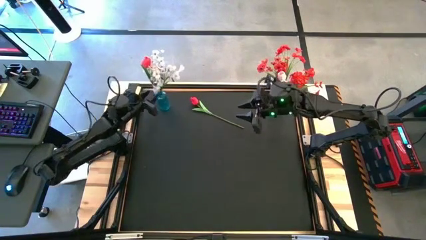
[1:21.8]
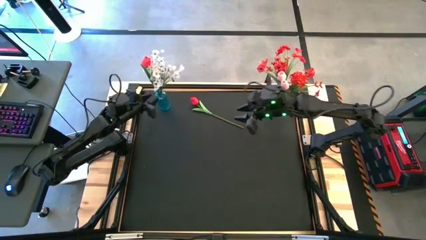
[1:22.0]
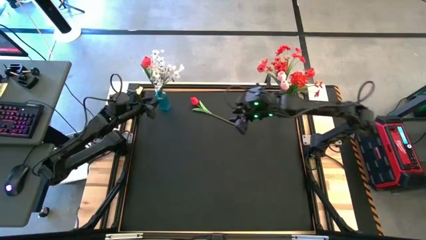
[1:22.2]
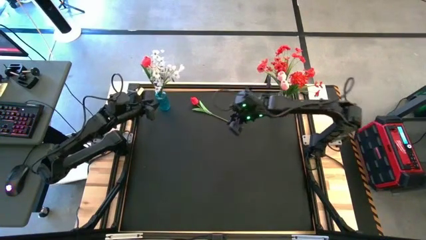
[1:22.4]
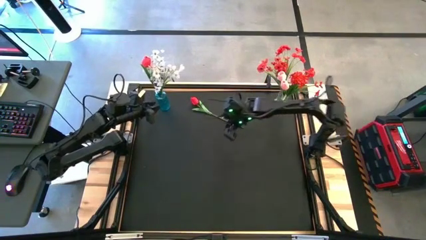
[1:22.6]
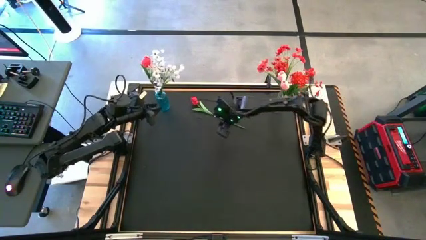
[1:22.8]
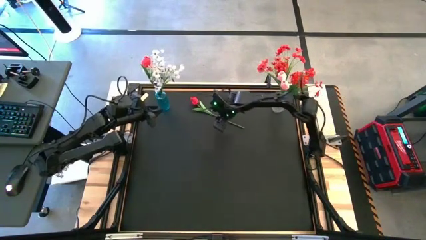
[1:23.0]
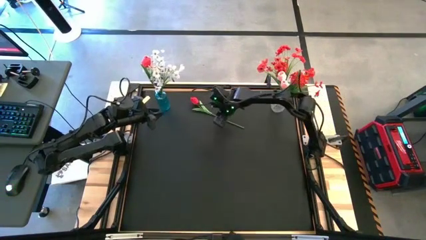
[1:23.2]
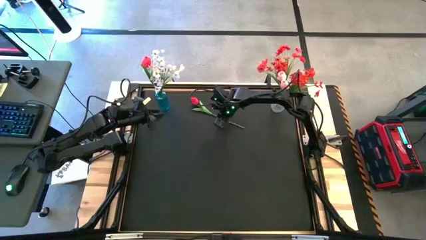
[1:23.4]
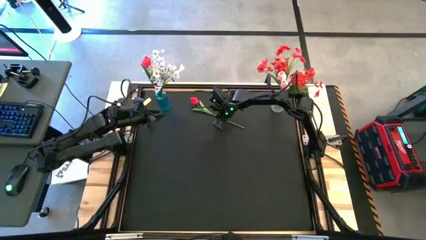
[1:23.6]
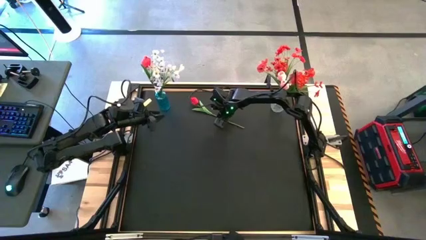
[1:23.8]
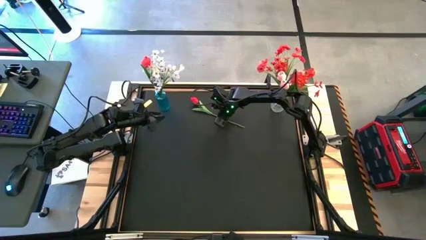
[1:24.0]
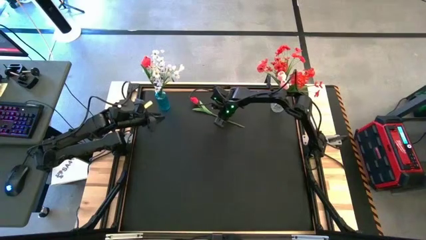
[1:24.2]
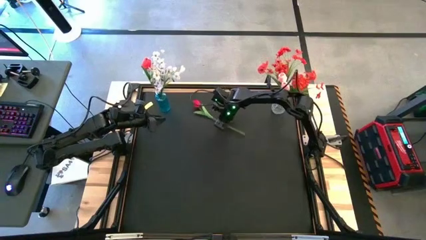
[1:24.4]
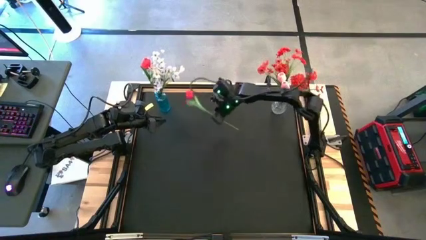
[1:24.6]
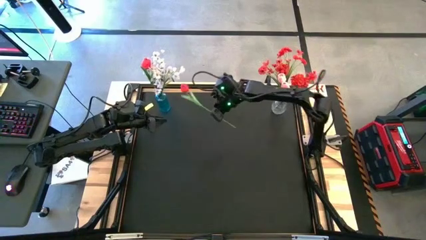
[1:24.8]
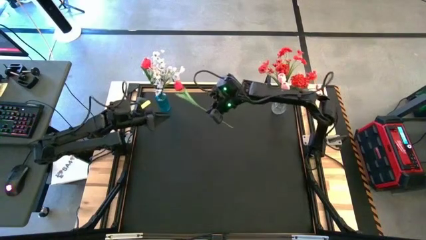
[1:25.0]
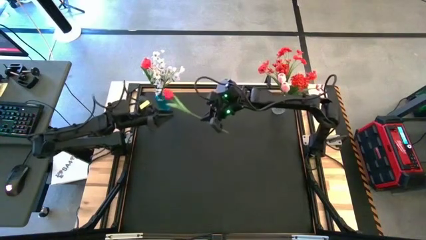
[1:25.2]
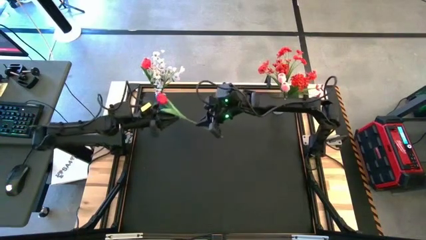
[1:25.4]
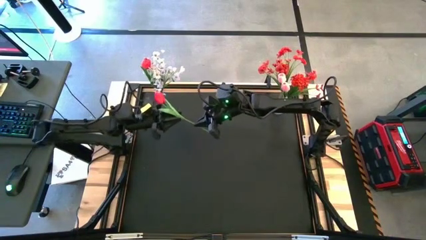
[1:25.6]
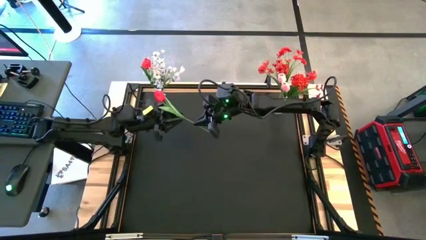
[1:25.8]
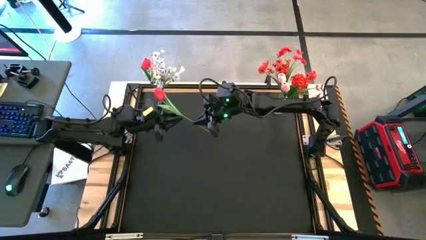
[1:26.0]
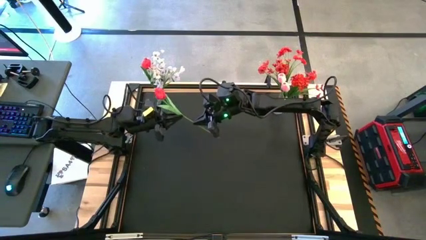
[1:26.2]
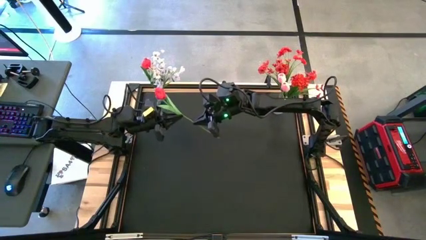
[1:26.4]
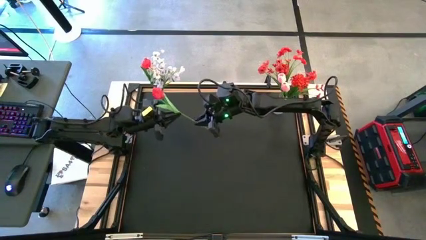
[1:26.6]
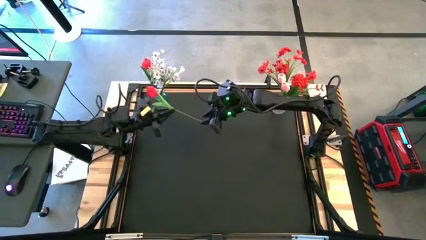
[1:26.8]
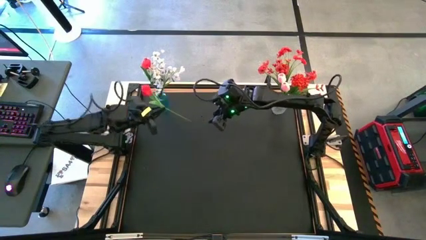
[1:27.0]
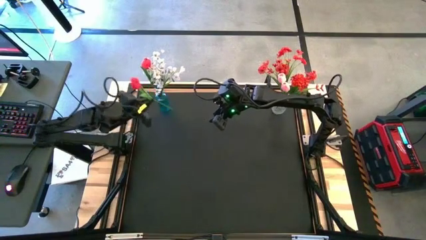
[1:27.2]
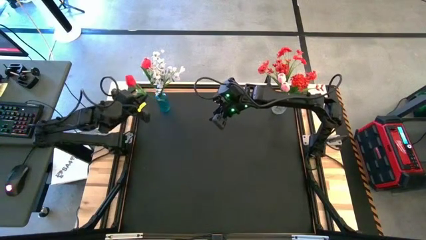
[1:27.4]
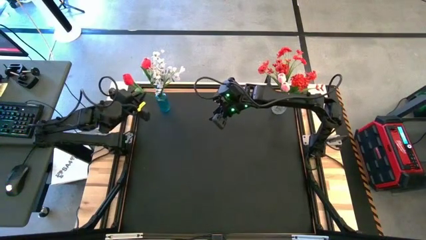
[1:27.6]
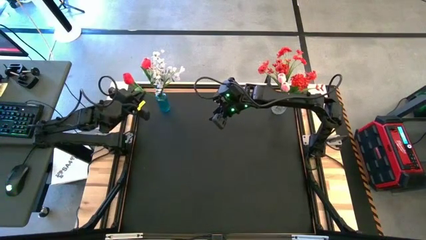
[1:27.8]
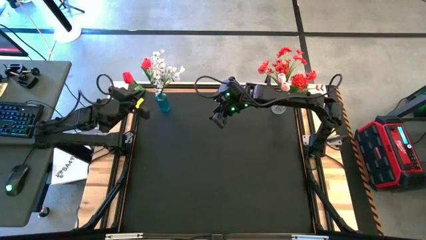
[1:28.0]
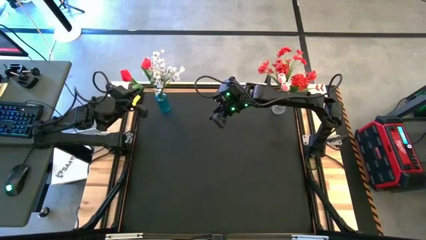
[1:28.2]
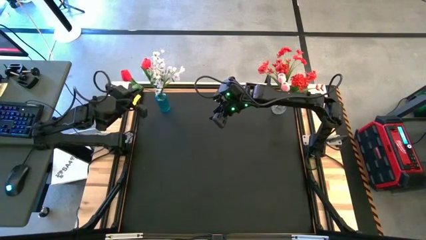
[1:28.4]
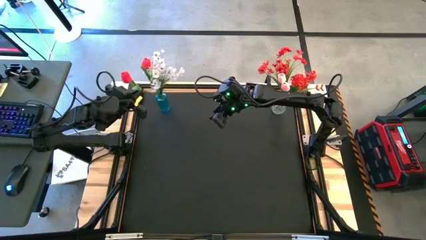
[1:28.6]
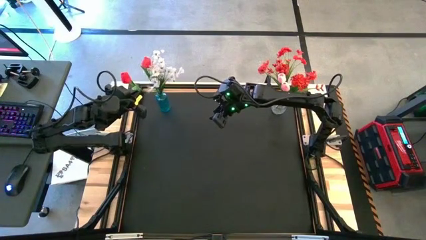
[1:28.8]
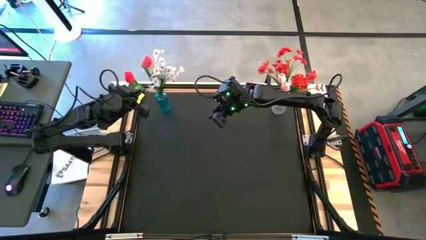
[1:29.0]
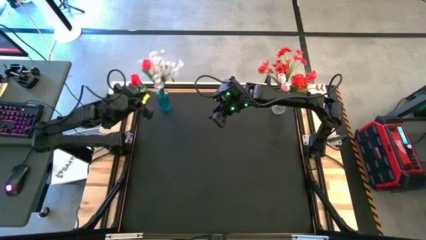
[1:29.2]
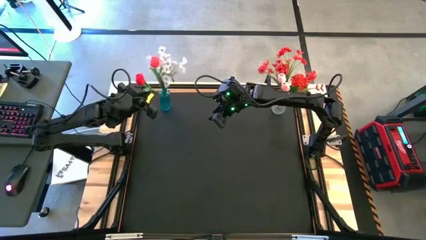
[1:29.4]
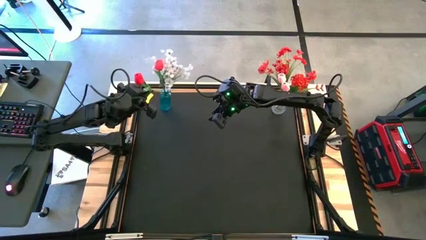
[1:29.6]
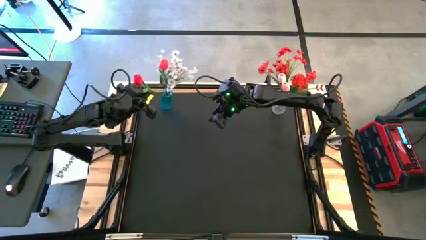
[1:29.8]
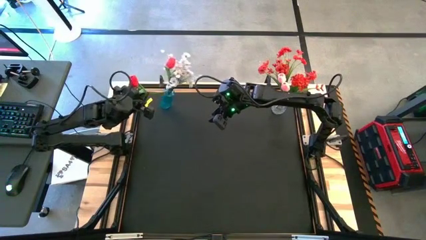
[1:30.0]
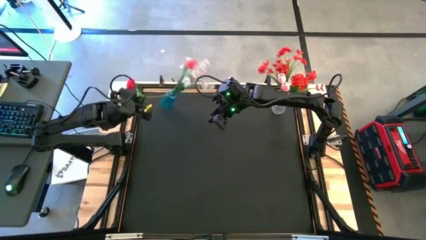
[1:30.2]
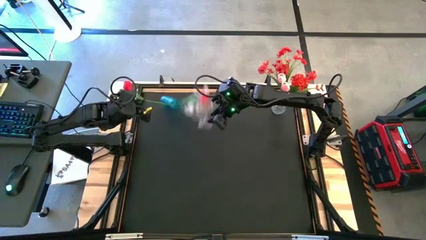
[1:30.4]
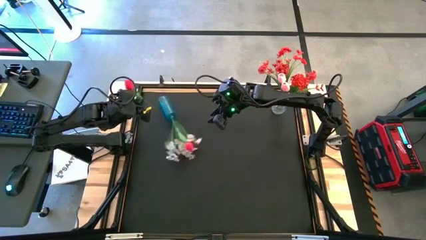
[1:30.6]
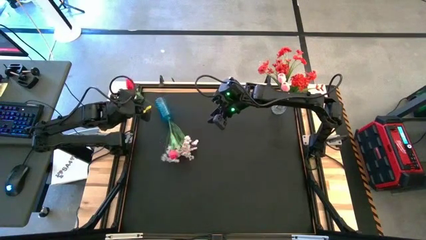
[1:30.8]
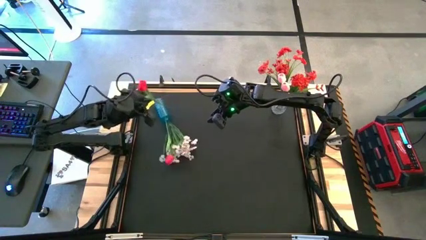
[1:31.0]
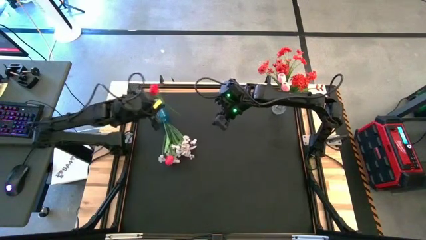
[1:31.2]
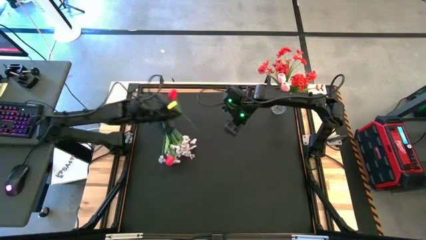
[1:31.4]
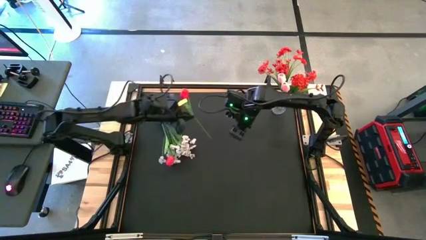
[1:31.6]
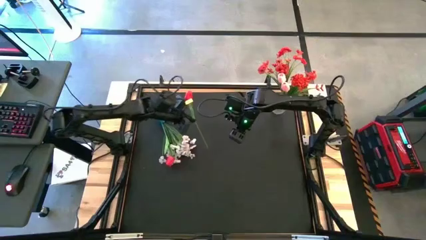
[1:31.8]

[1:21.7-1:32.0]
Task: Sort flowers into vase by color
Put the red tulip flower into the blue vase
